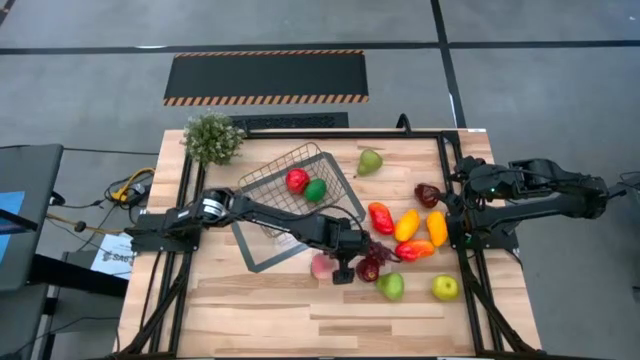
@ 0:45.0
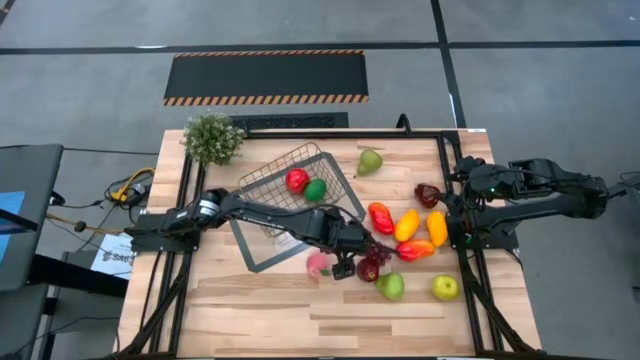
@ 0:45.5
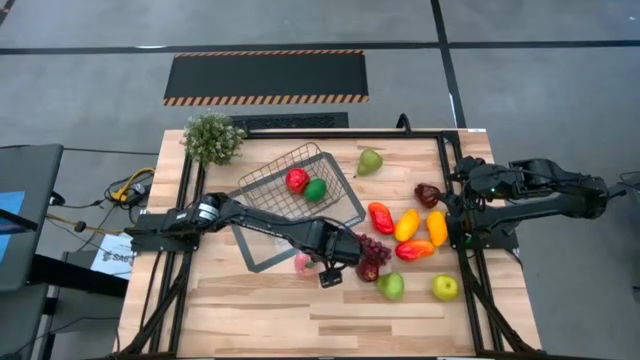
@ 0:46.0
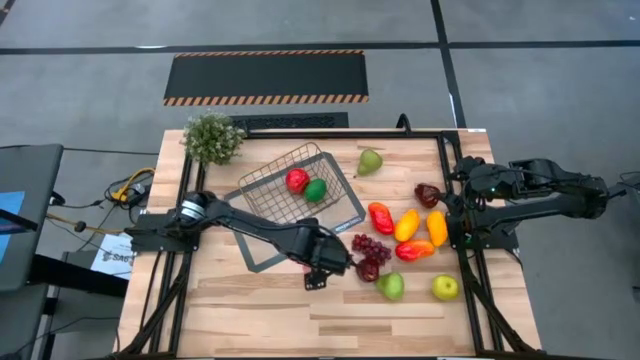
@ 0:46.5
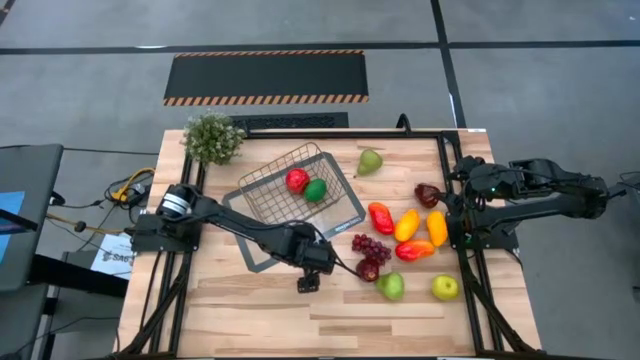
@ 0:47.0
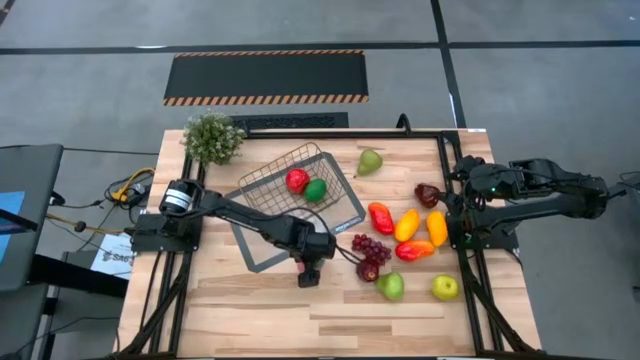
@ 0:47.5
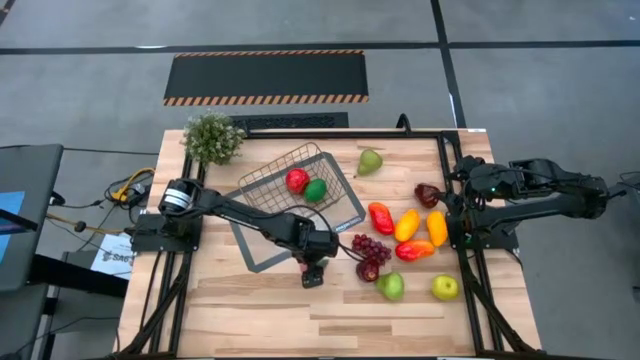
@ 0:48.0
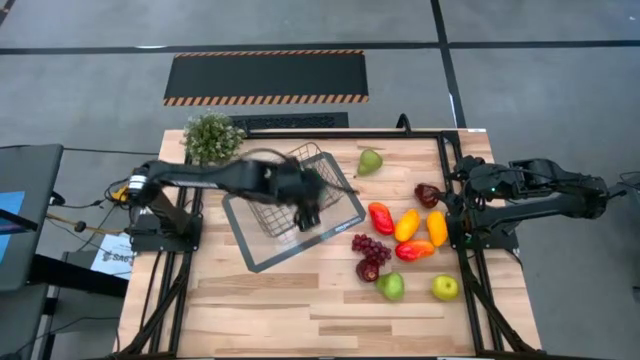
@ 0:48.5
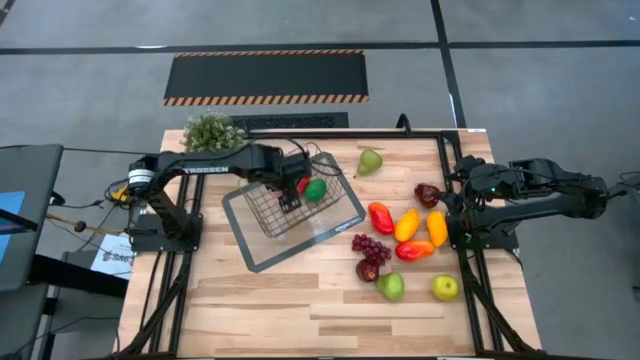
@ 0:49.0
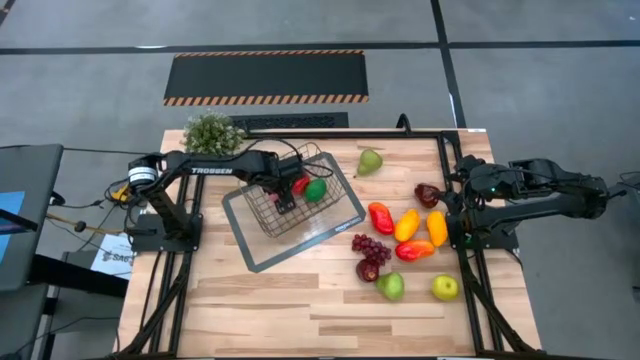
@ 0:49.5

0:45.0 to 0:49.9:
Task: Build produce basket
Put the pink peach into the gold wire basket

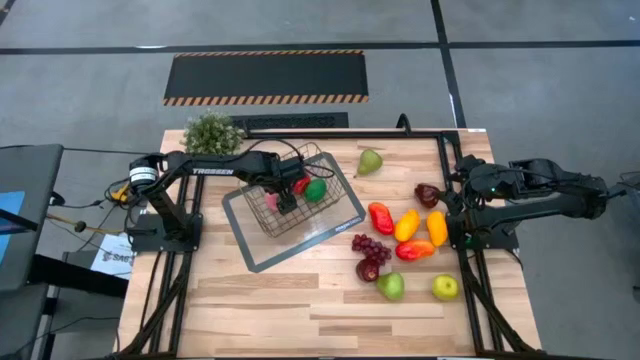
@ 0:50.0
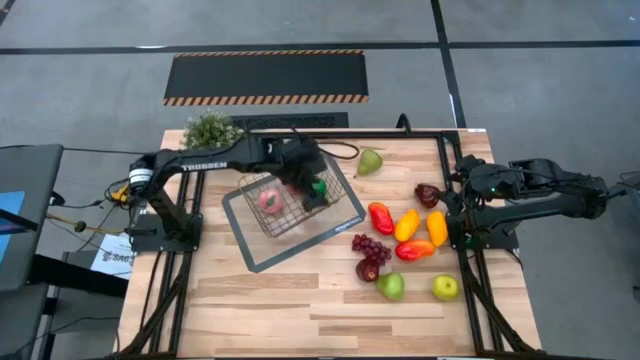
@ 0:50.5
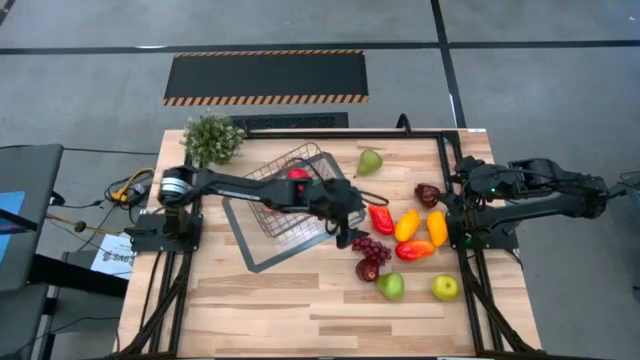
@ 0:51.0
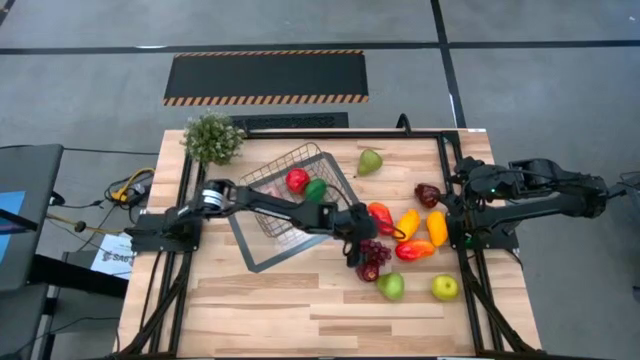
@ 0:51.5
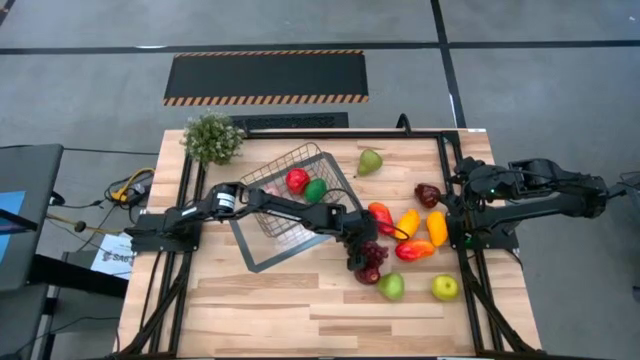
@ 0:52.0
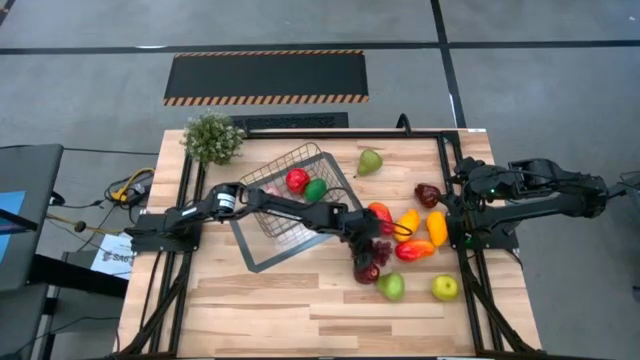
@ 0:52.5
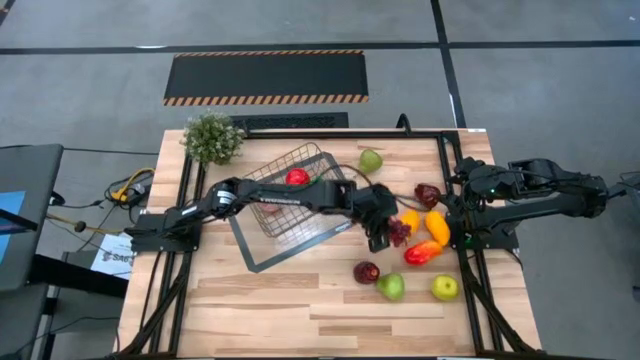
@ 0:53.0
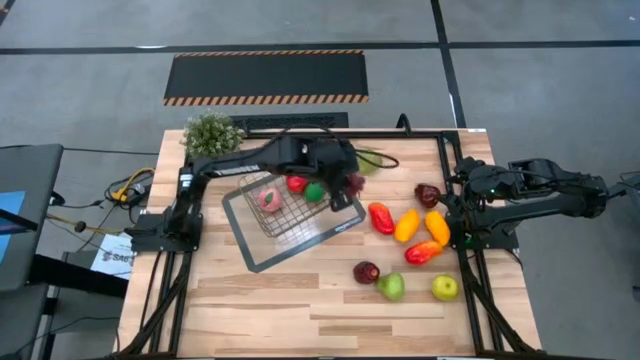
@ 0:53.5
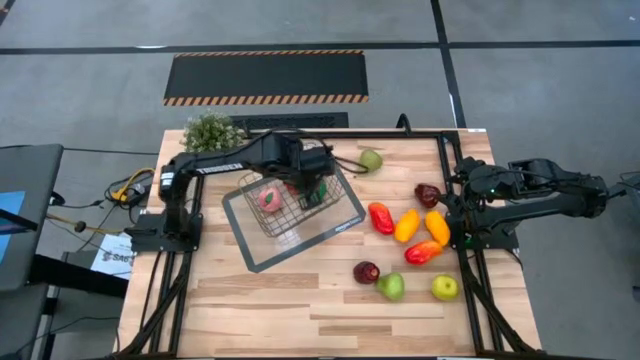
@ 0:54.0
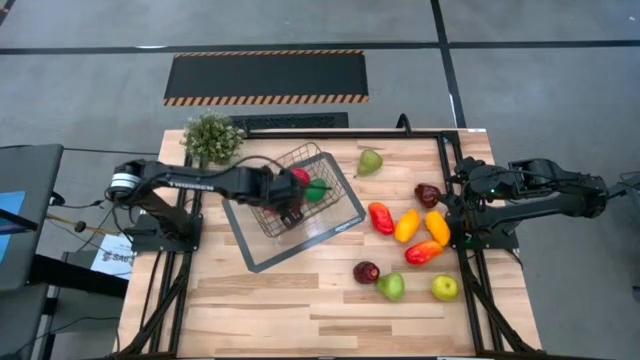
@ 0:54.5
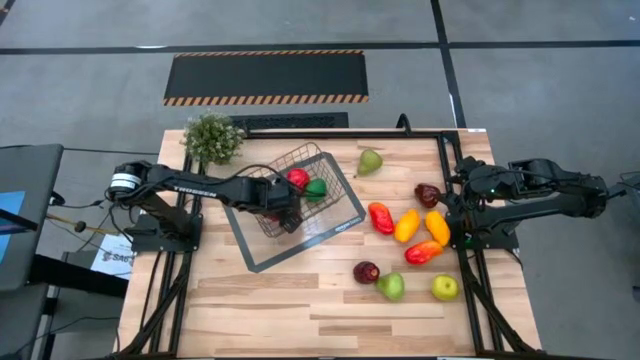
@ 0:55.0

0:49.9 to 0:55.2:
Put the red grapes into the gold wire basket

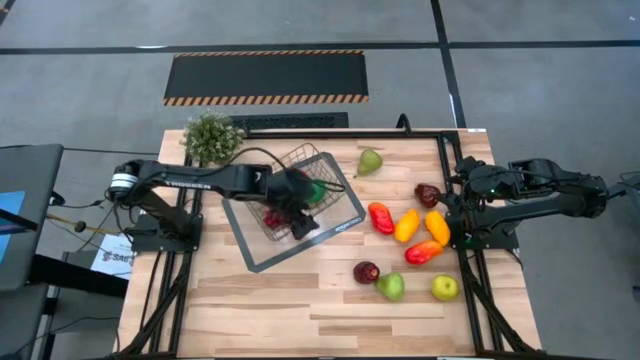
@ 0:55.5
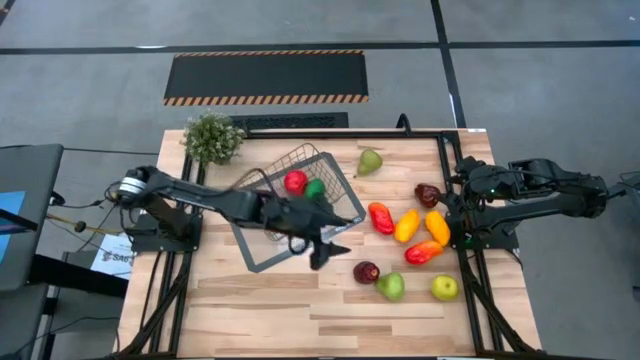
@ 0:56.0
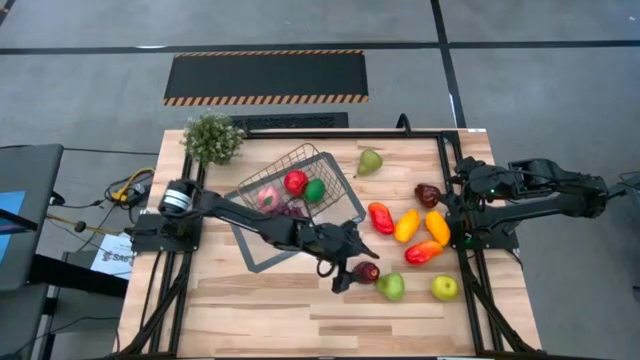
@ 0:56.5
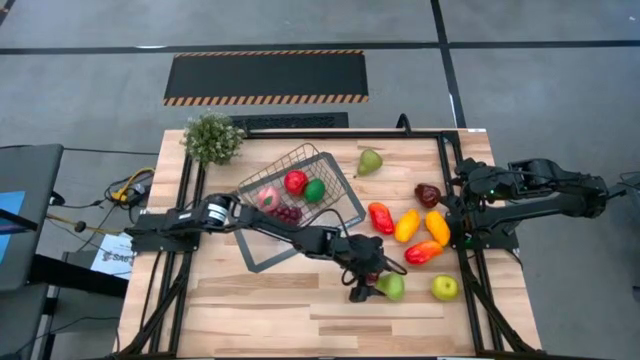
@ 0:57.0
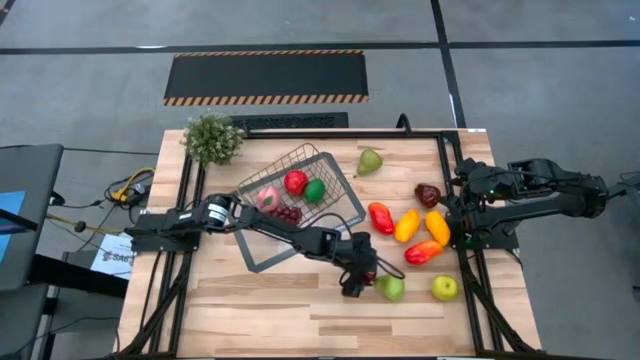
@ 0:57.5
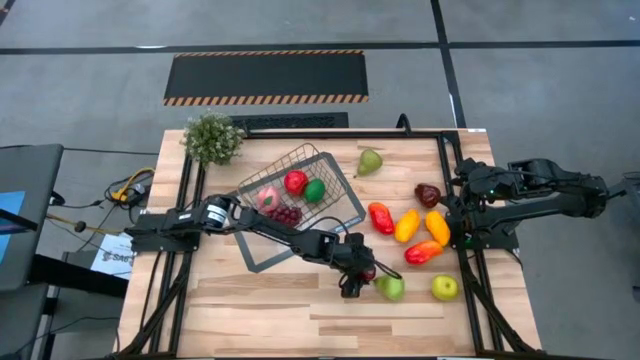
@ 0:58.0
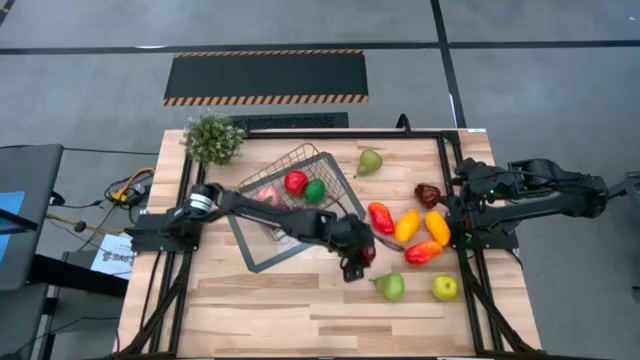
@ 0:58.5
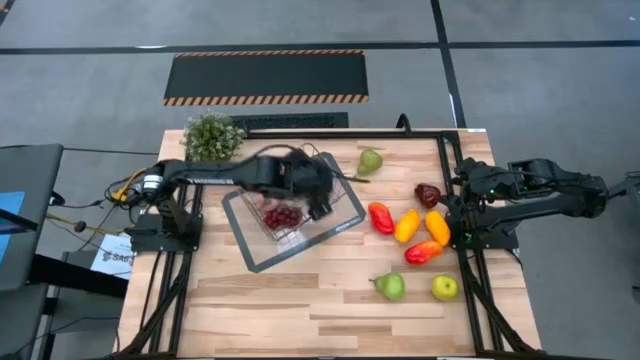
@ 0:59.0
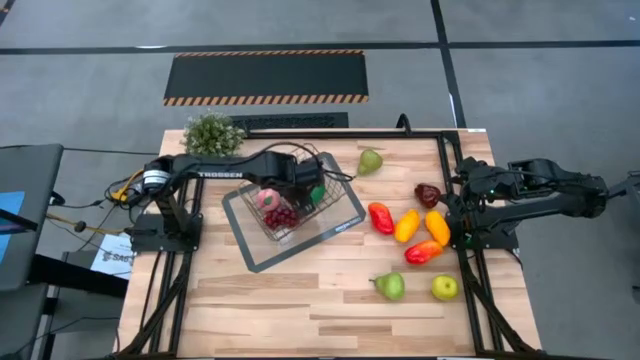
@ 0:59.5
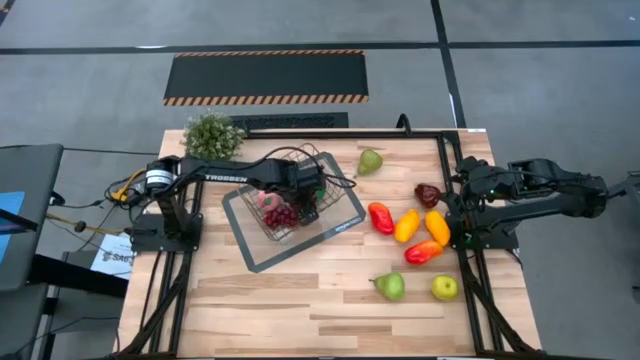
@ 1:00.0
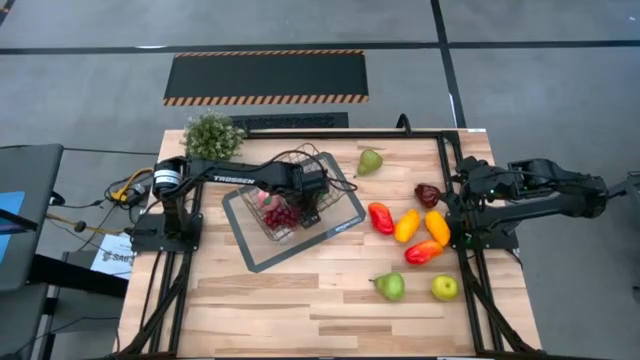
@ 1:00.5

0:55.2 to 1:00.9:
Put the dark red apple into the gold wire basket

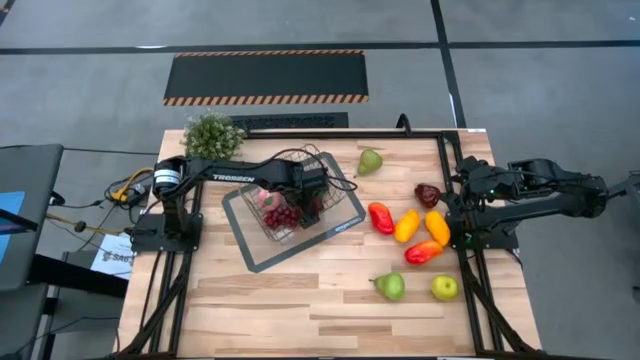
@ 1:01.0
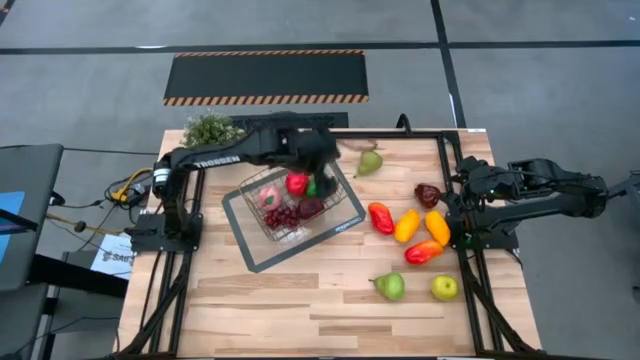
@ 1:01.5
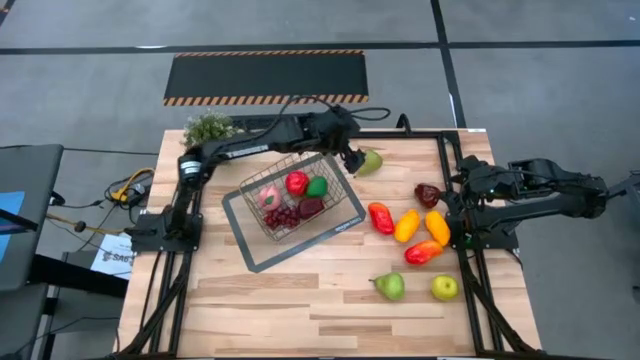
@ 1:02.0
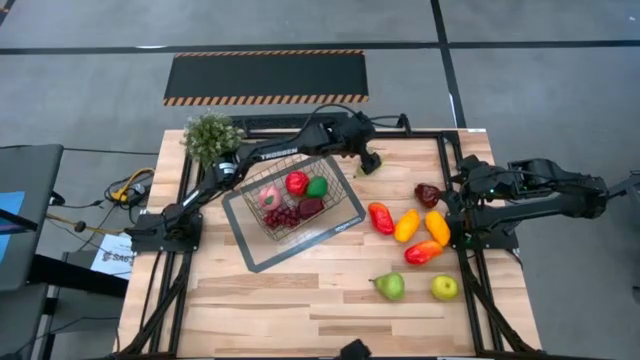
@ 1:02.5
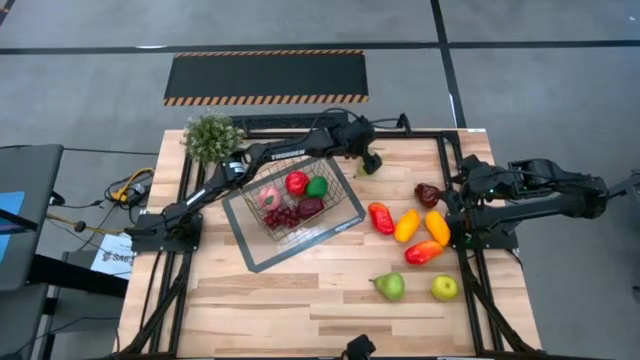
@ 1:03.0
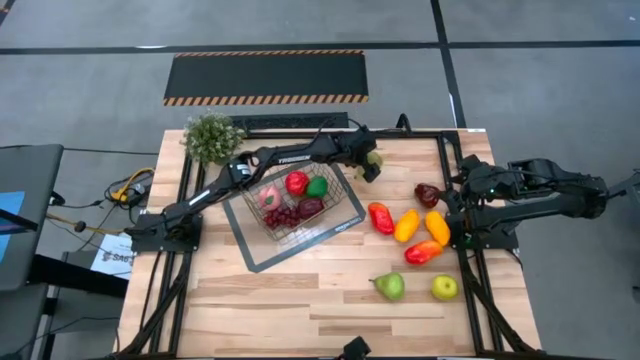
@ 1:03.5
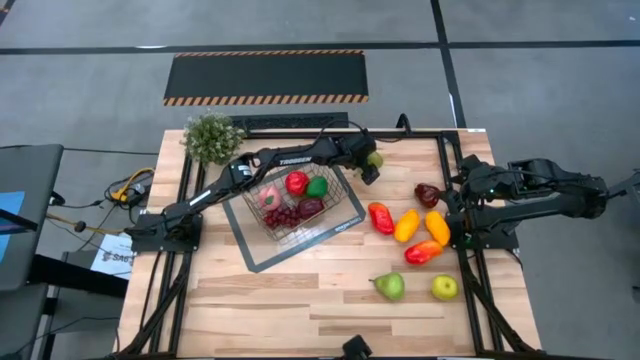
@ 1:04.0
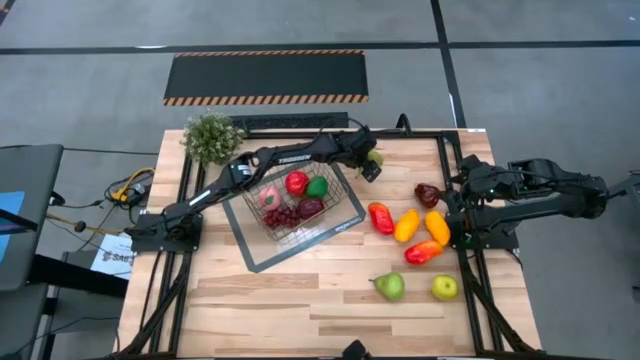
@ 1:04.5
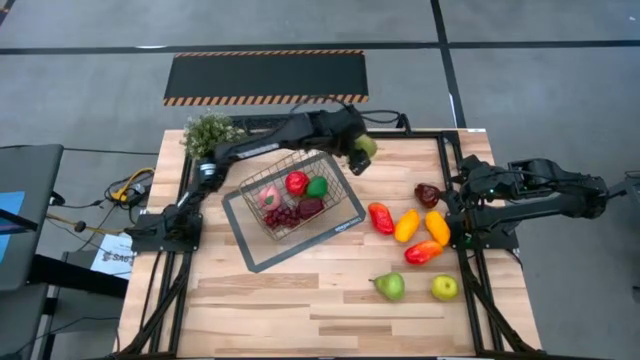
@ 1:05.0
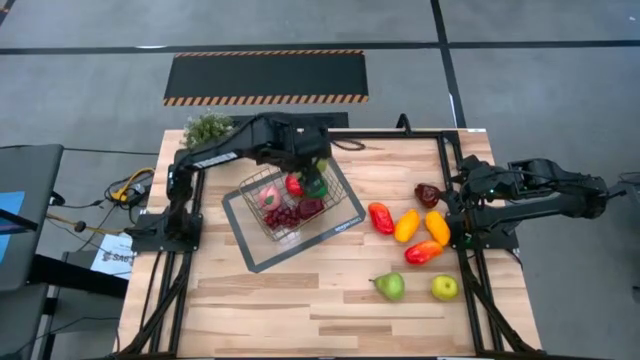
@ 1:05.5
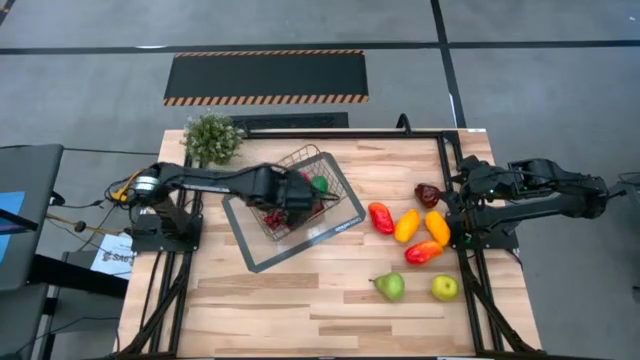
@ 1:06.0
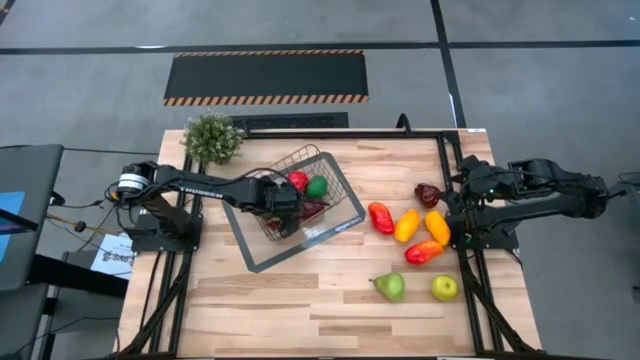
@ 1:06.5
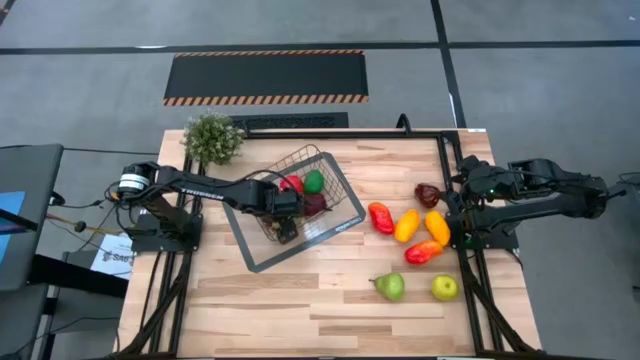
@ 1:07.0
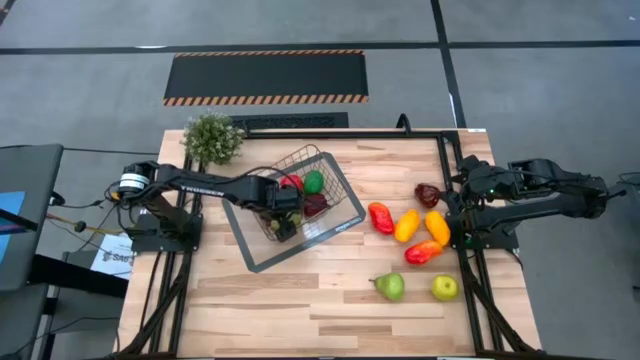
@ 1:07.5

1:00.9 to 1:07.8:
Put the green pear into the gold wire basket
